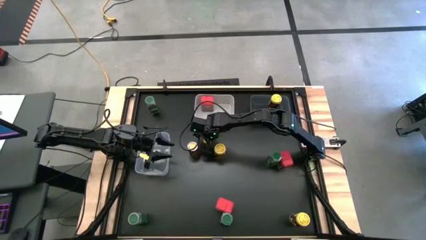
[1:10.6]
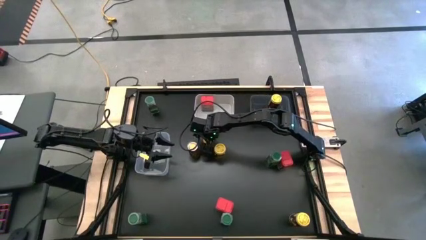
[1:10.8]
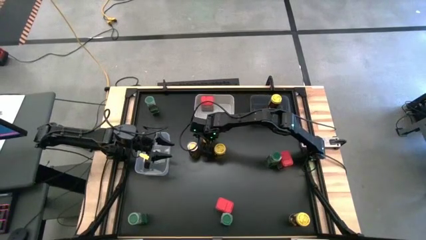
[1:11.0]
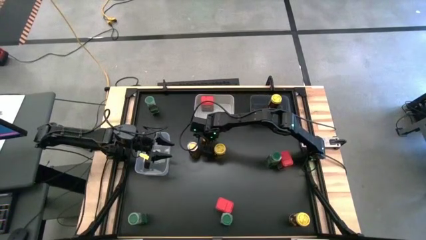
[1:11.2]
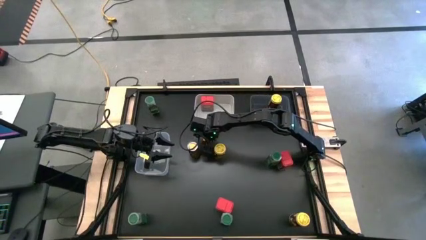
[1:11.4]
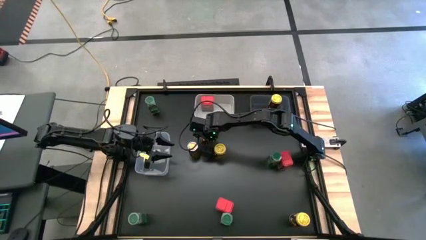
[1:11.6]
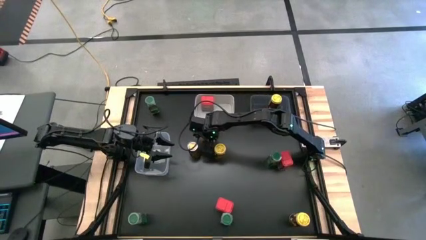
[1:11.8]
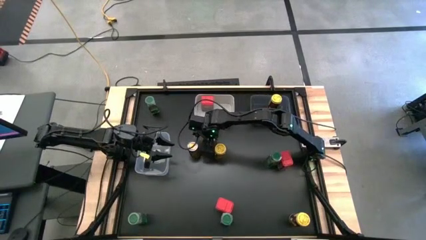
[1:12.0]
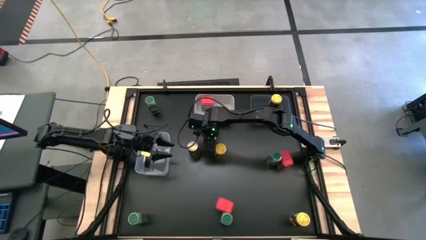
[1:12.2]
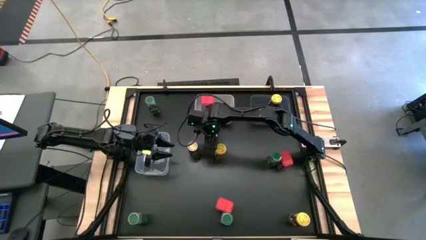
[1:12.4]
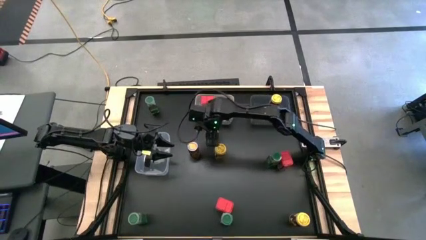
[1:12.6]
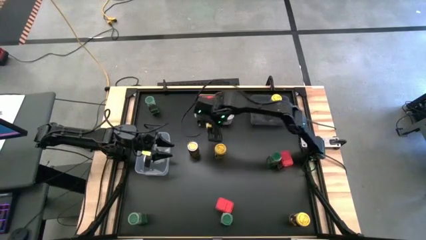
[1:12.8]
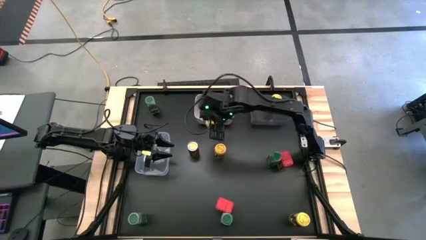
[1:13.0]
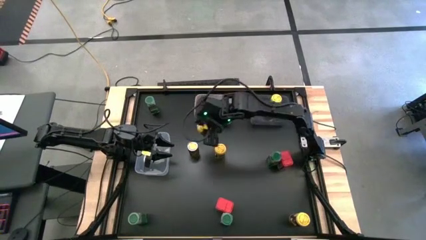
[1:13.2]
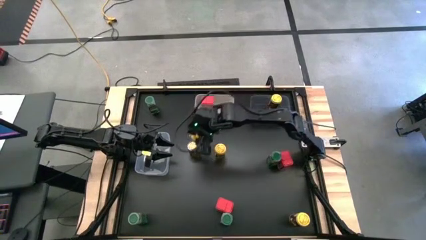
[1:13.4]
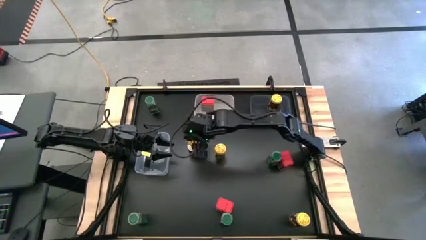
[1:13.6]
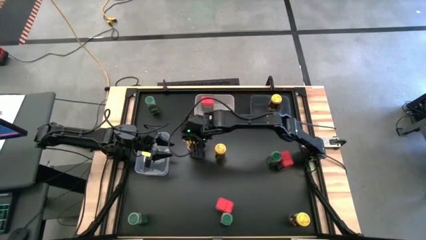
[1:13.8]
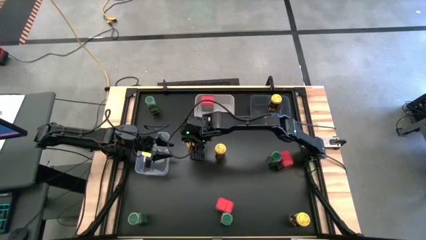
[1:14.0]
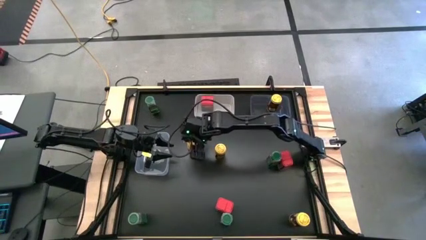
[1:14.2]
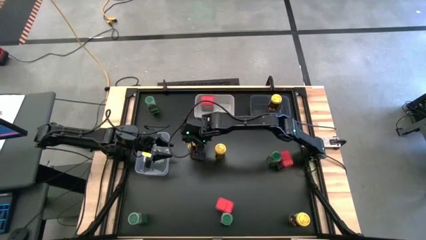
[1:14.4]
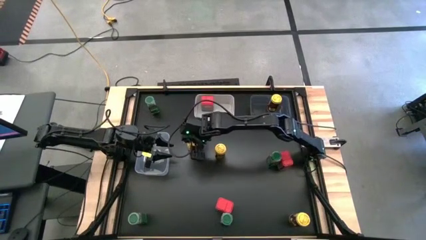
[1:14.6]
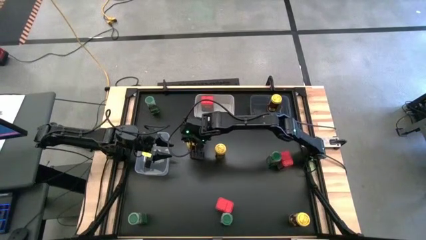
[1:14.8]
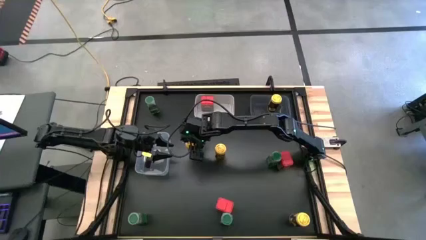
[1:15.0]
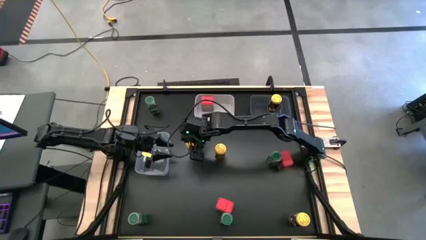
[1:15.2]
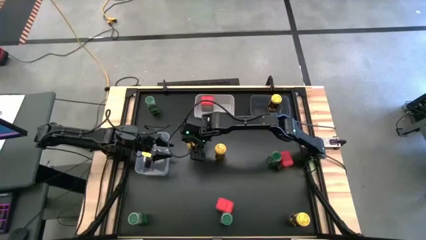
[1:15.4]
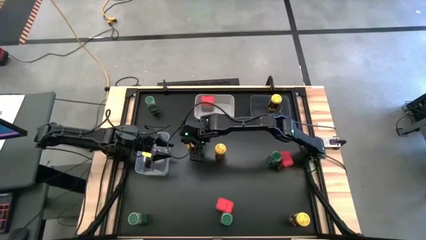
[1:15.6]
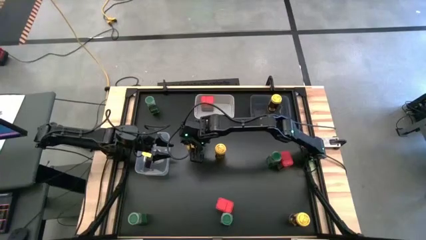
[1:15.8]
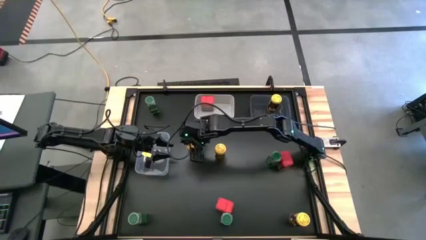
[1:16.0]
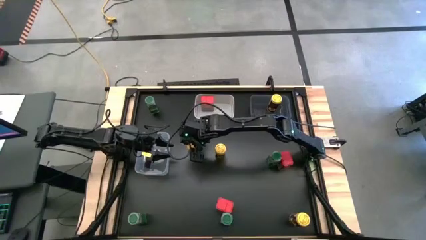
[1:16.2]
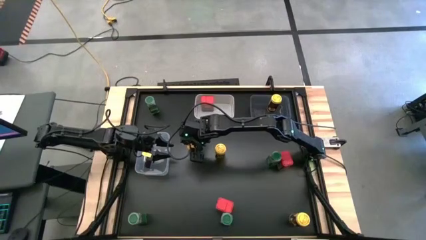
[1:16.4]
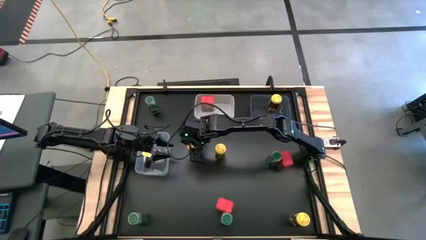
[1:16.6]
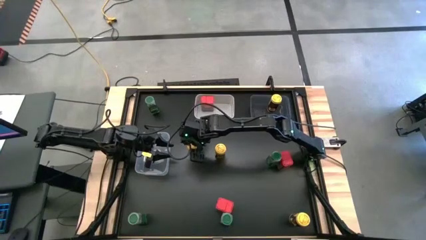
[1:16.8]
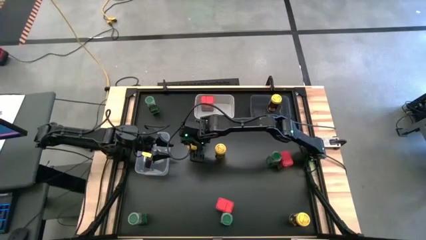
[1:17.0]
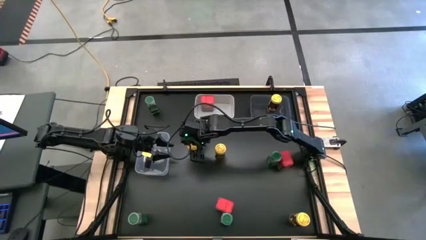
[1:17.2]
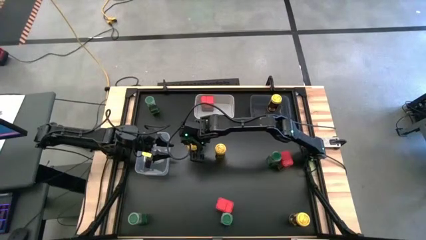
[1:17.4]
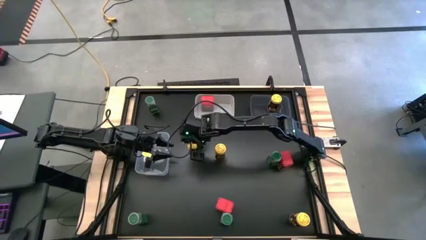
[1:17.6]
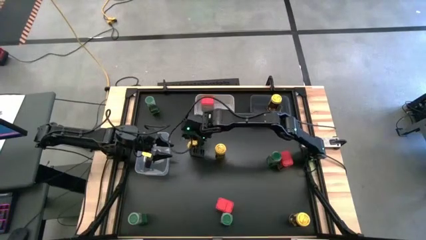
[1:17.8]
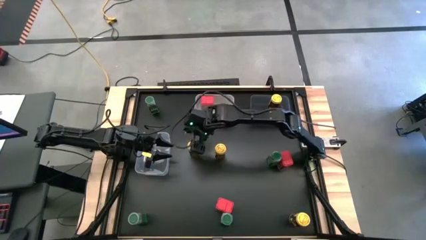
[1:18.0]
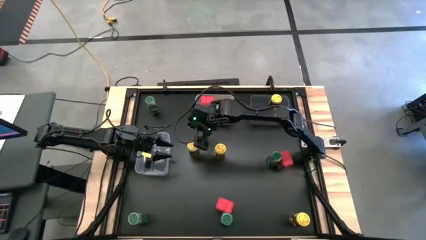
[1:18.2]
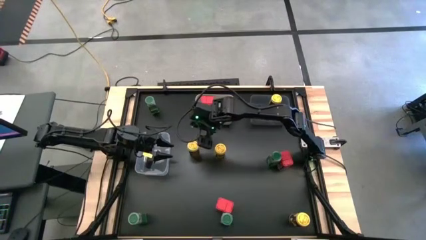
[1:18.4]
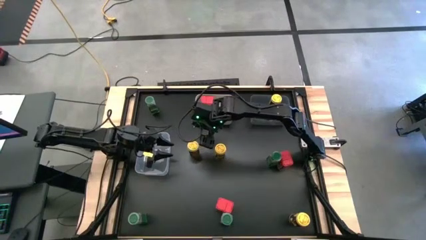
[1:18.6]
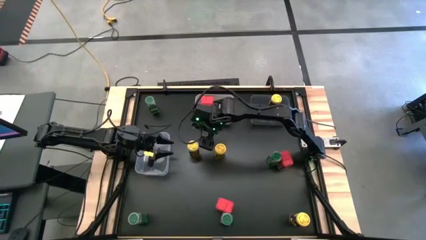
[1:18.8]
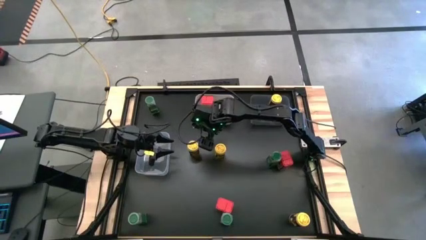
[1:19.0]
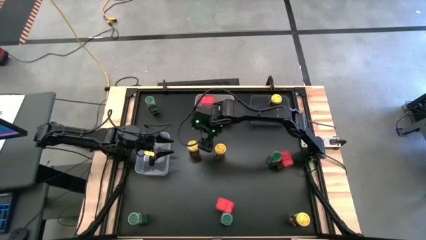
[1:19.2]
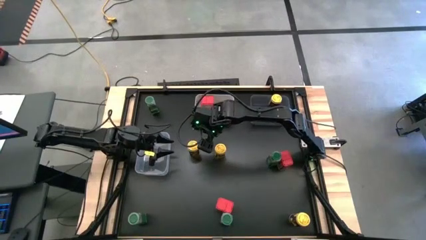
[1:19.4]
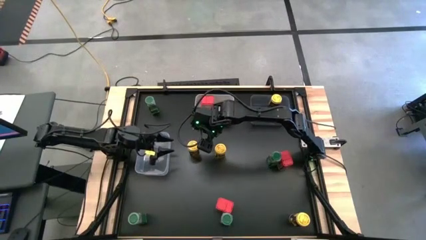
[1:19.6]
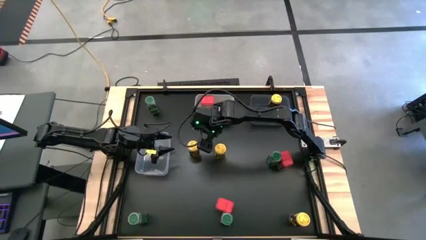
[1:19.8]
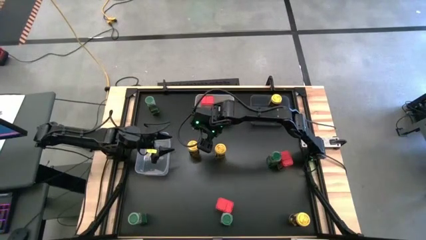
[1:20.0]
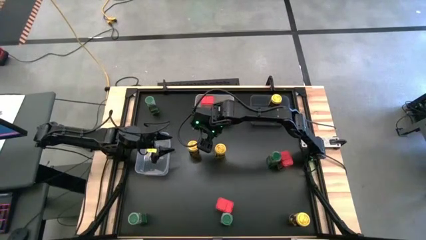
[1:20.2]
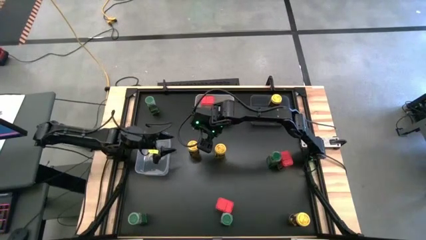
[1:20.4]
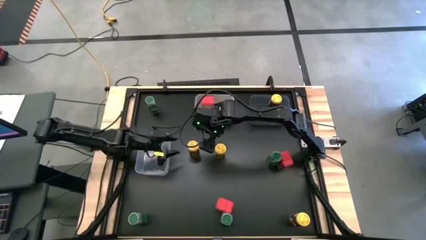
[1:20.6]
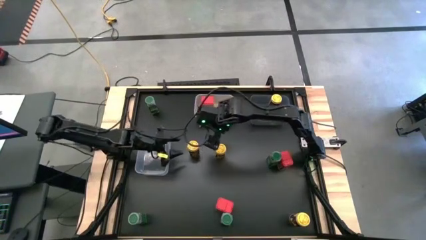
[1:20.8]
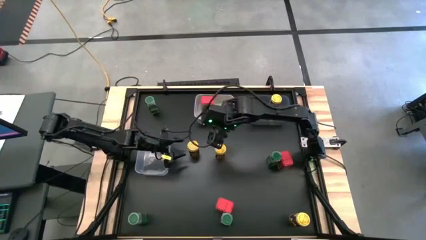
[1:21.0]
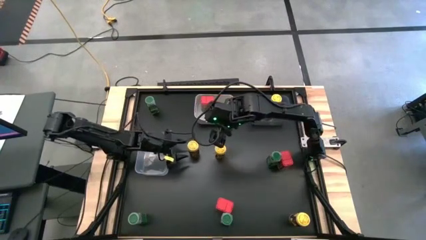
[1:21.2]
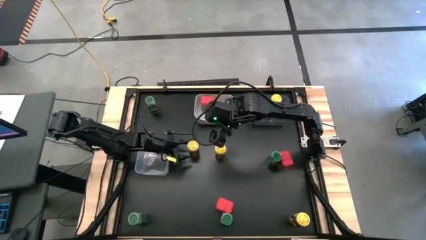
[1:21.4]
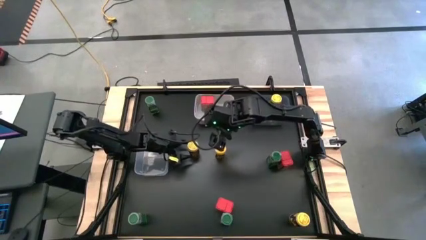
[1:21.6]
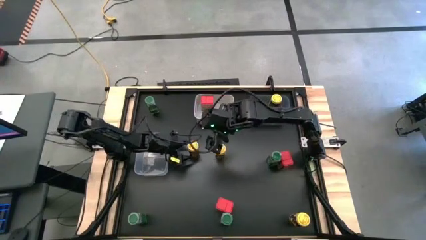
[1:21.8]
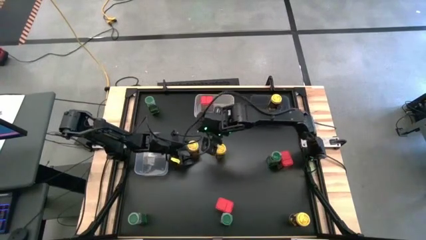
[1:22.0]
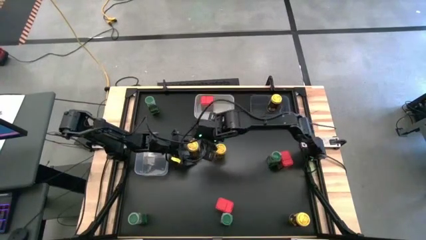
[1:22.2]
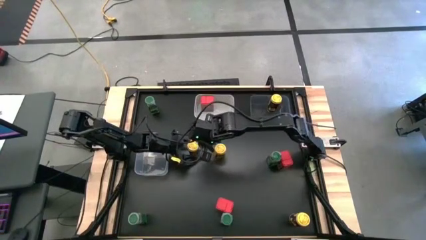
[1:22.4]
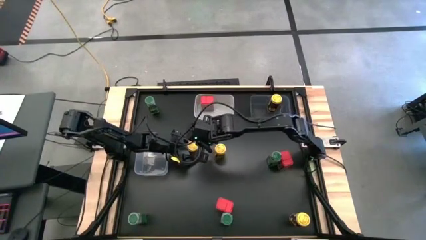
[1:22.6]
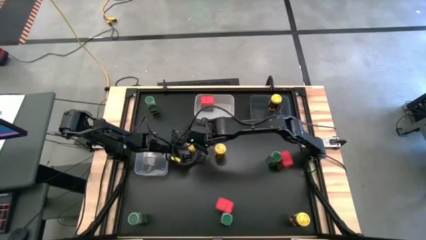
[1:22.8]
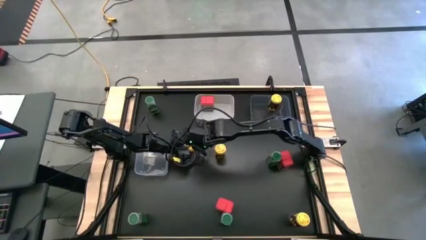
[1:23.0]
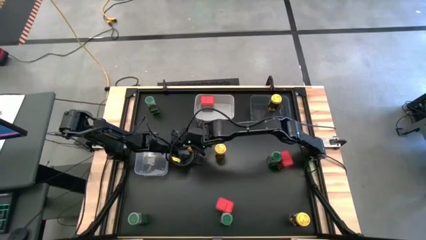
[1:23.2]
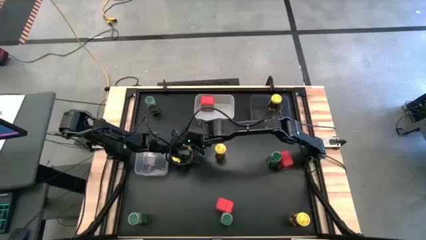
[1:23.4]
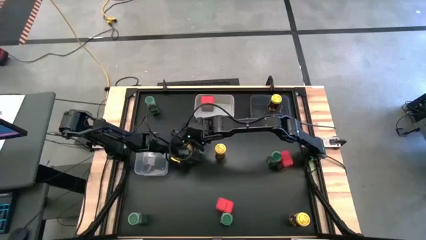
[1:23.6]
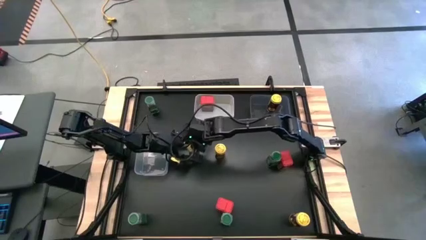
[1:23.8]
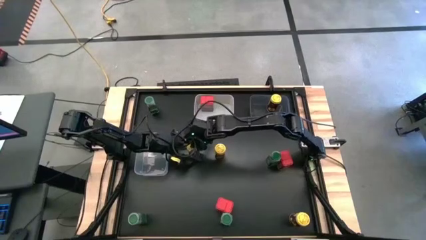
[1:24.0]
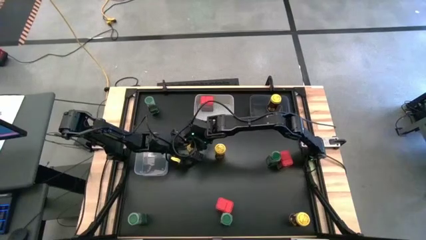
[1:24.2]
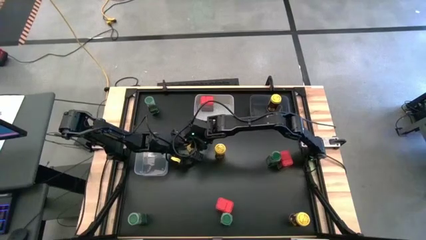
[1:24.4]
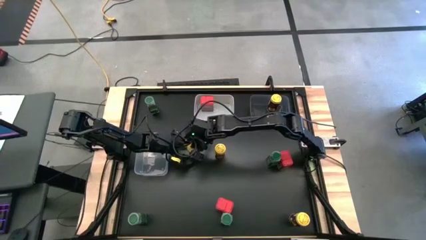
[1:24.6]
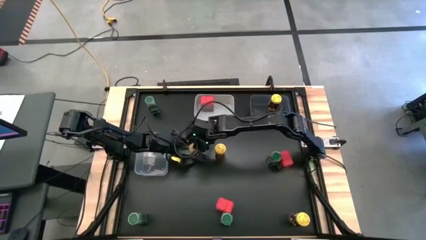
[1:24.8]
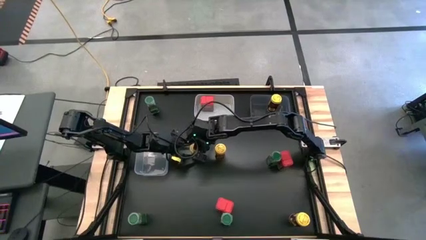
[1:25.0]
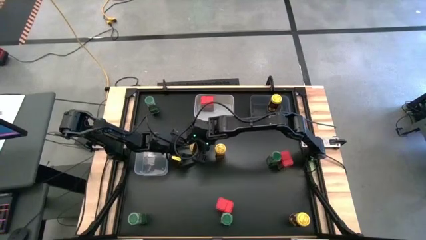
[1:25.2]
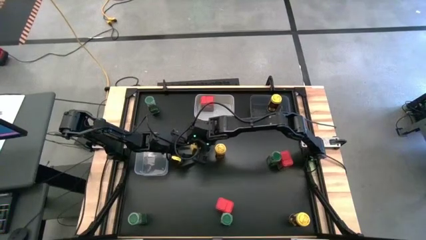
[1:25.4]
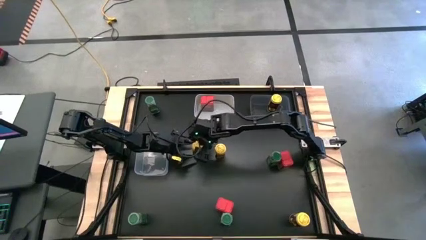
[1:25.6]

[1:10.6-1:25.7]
Task: Sort spices by type
Put the bottom left yellow seasoning bottle into the black bin

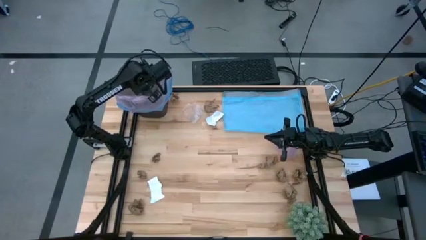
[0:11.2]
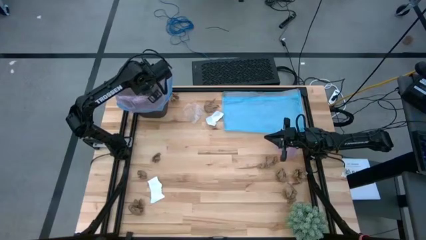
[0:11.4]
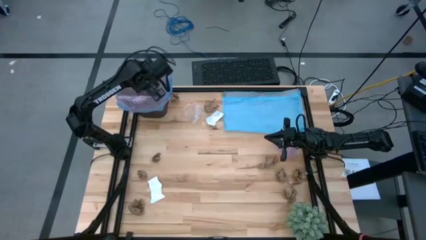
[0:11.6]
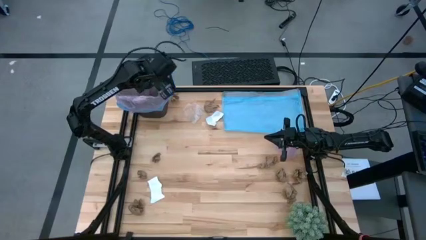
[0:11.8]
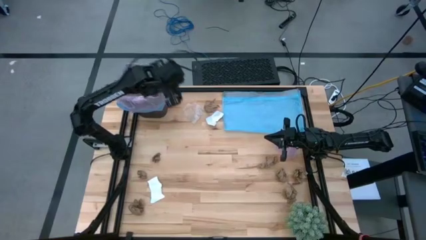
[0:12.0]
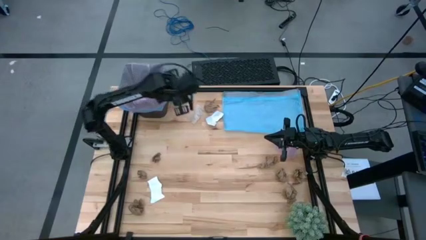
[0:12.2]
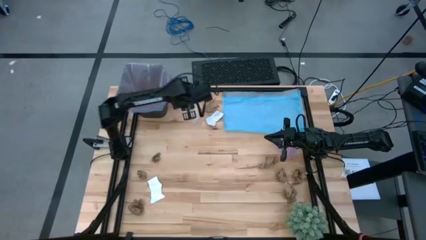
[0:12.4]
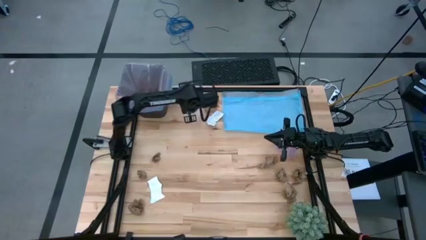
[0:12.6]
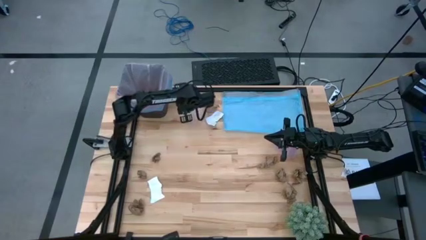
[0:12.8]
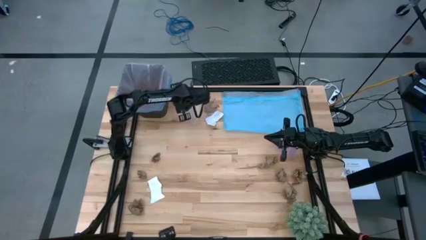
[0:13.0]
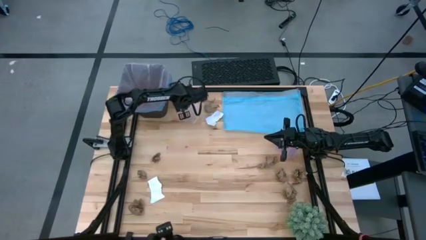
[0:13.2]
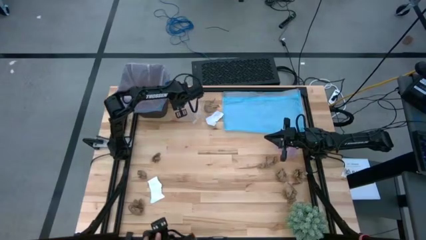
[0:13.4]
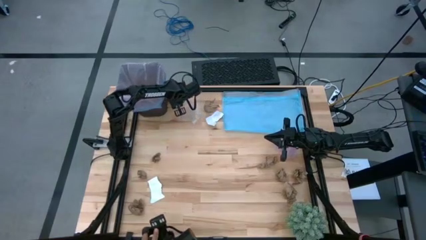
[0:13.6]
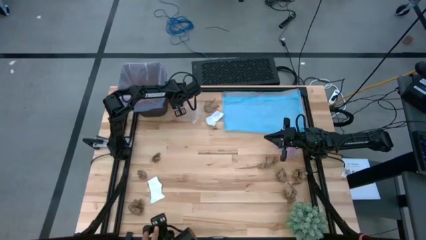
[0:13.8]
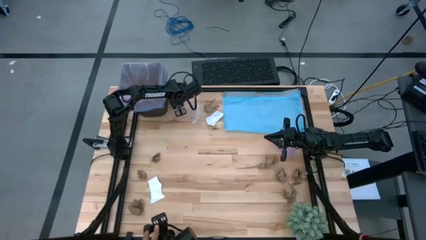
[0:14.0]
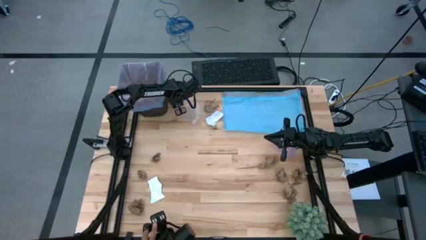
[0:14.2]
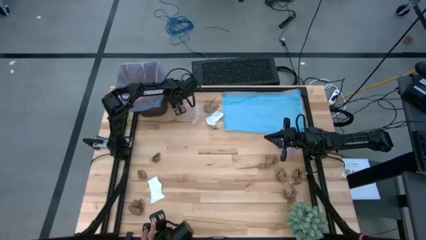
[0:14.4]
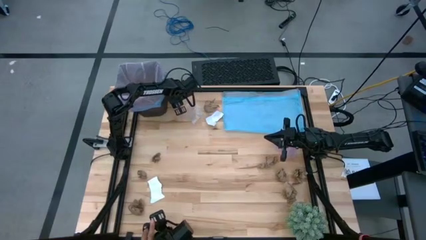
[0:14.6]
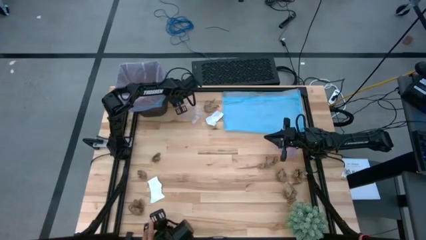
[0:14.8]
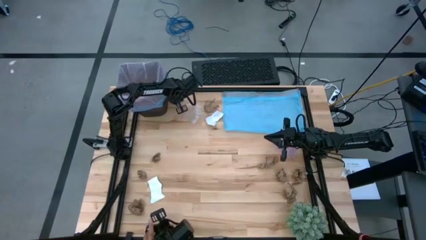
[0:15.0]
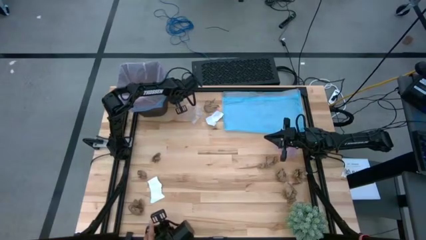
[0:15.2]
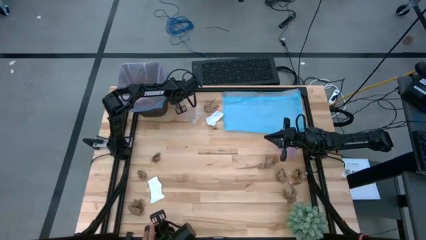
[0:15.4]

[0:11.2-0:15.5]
Task: place trash/remove bag and relplace
Put the brown napkin into the trash bin
